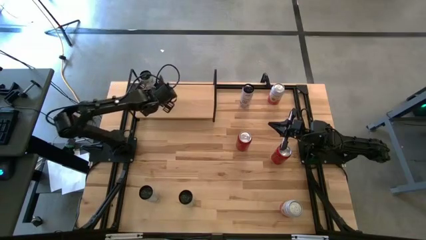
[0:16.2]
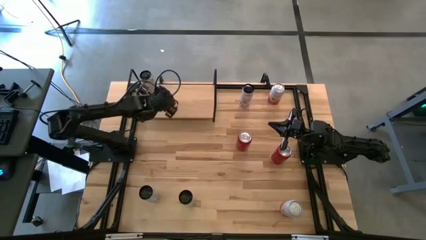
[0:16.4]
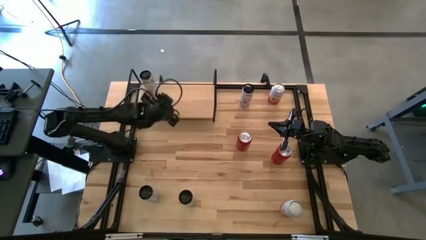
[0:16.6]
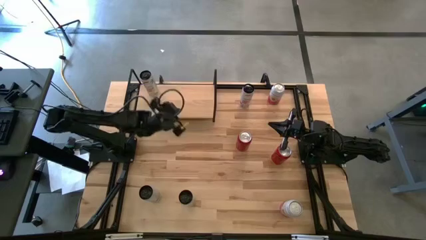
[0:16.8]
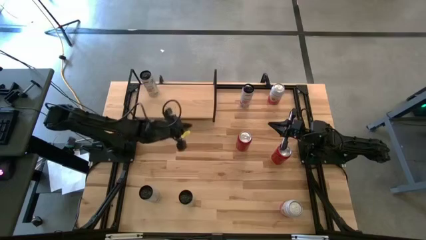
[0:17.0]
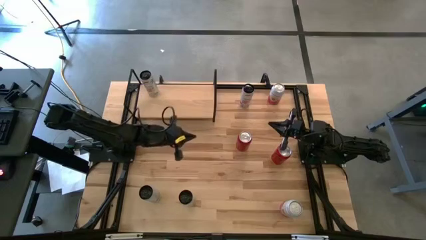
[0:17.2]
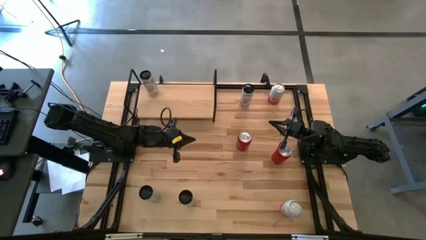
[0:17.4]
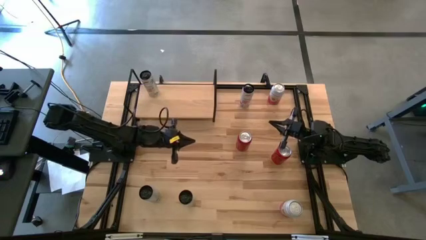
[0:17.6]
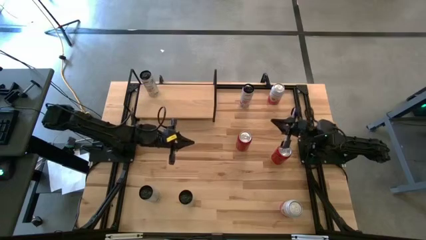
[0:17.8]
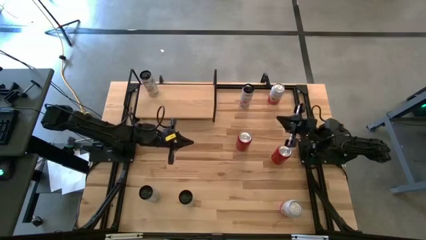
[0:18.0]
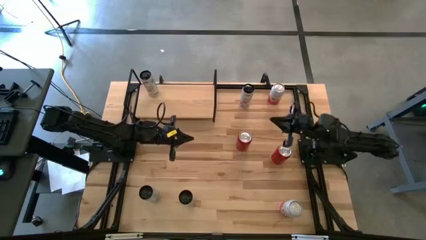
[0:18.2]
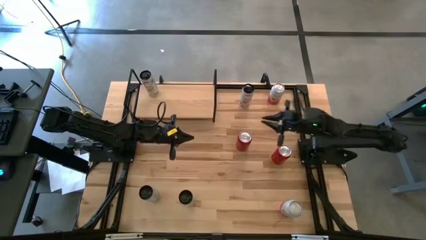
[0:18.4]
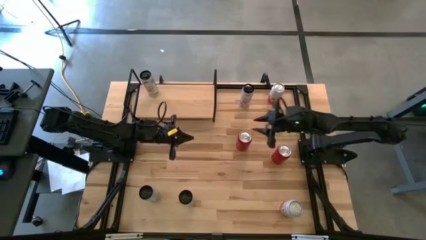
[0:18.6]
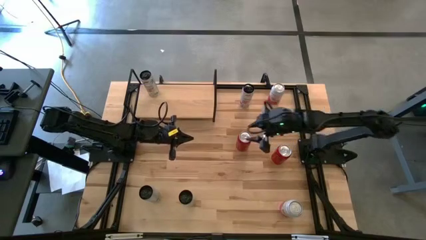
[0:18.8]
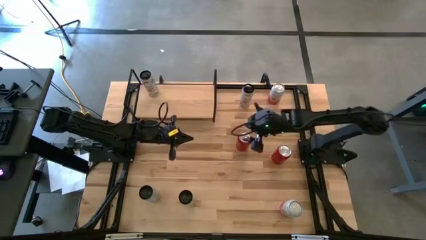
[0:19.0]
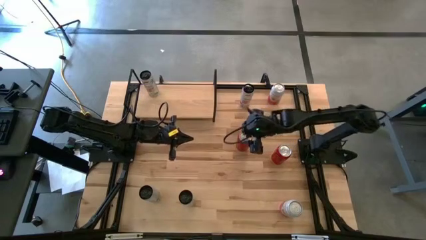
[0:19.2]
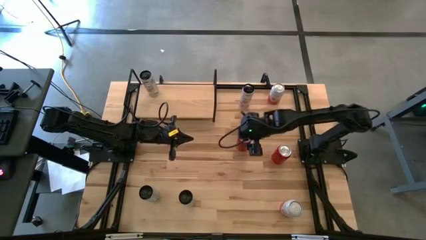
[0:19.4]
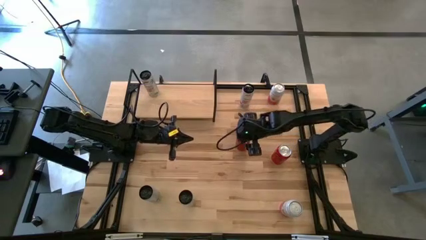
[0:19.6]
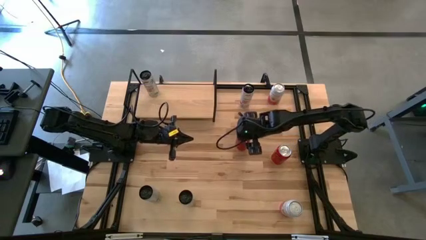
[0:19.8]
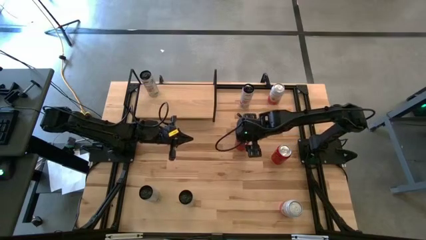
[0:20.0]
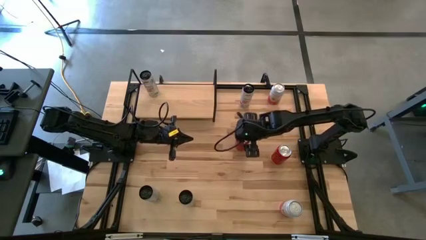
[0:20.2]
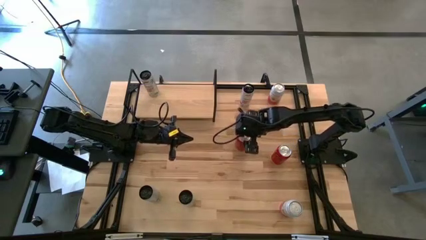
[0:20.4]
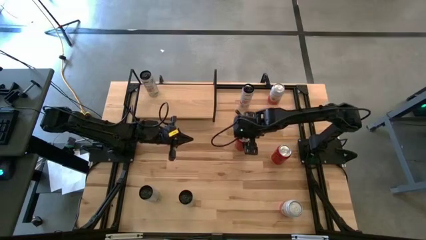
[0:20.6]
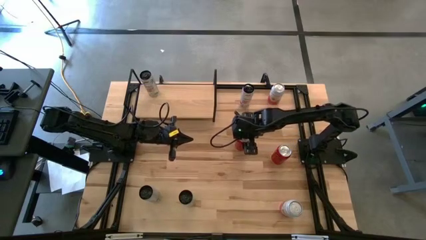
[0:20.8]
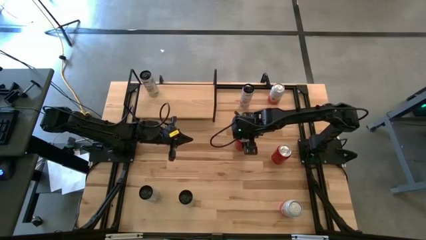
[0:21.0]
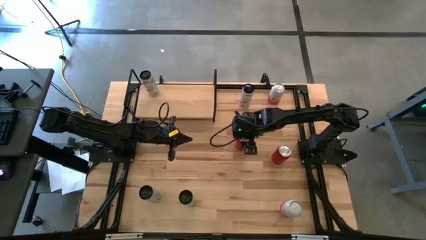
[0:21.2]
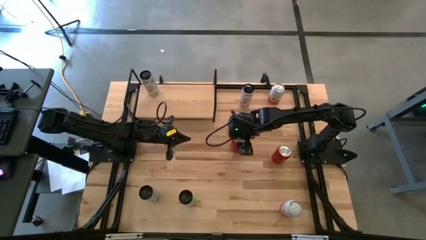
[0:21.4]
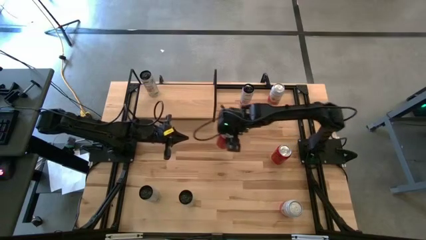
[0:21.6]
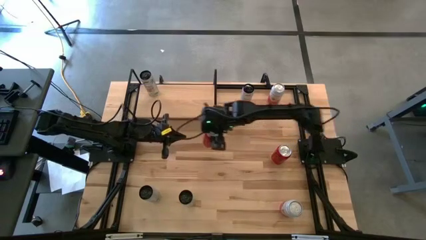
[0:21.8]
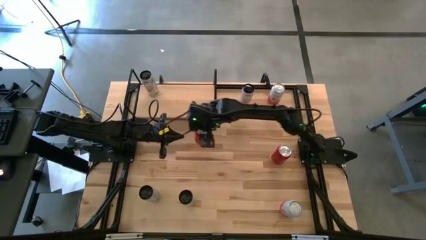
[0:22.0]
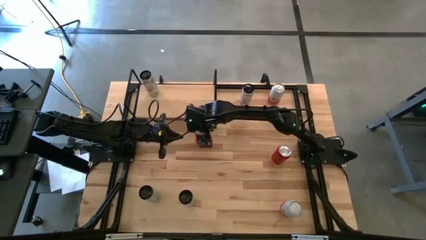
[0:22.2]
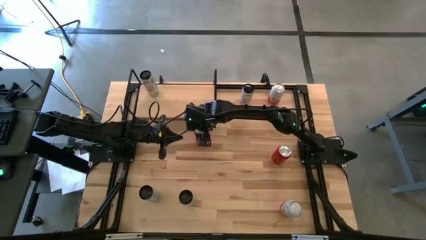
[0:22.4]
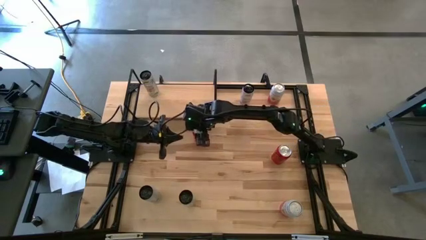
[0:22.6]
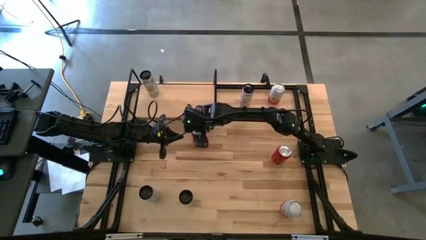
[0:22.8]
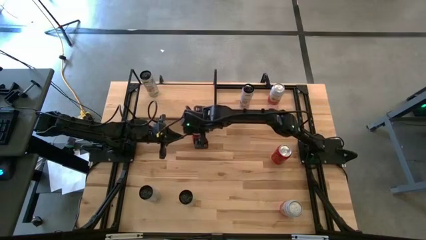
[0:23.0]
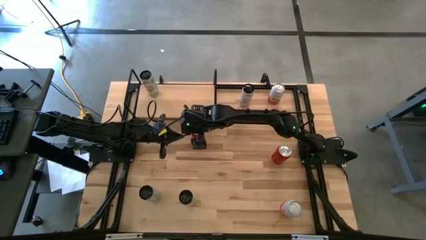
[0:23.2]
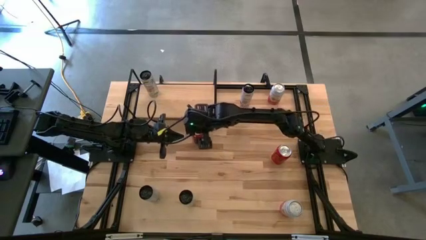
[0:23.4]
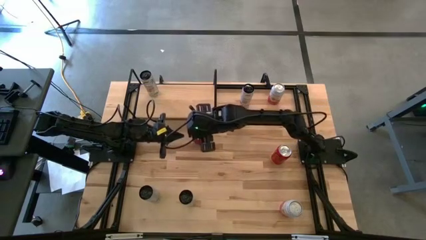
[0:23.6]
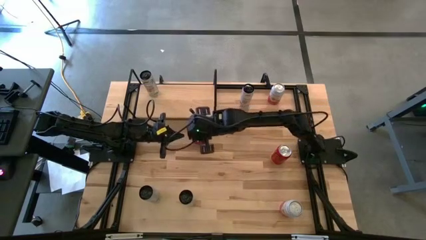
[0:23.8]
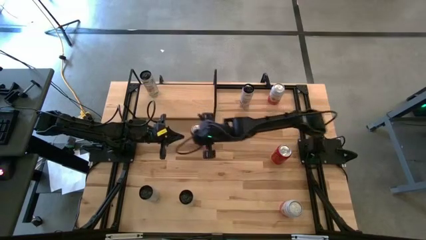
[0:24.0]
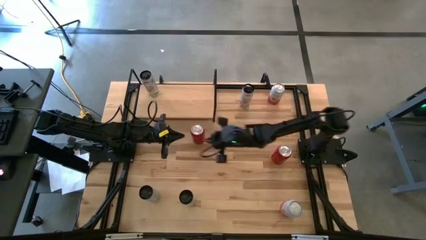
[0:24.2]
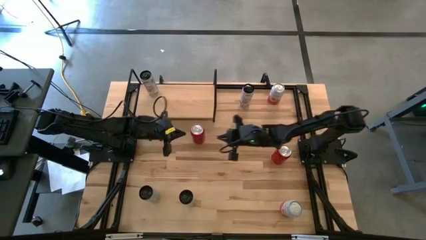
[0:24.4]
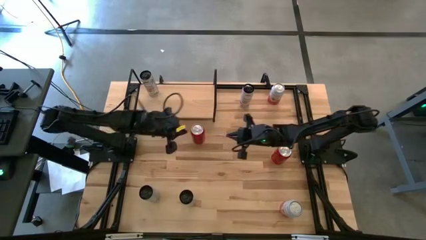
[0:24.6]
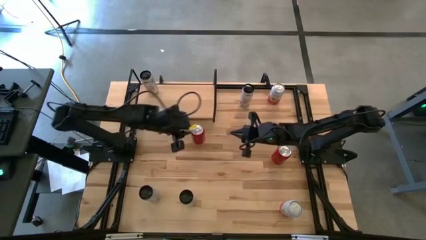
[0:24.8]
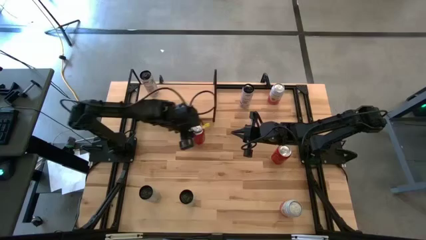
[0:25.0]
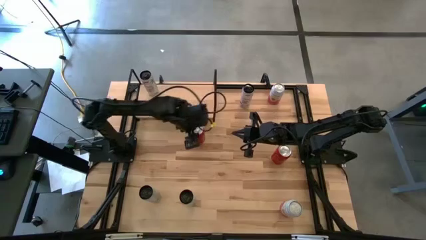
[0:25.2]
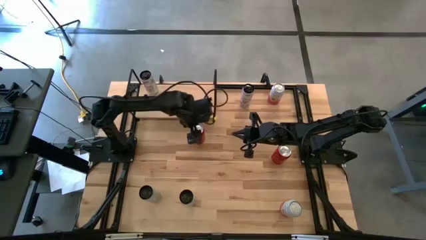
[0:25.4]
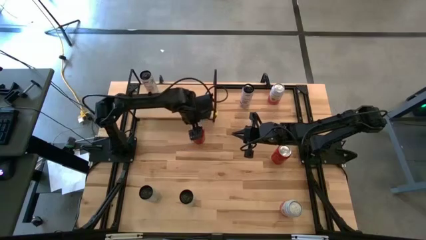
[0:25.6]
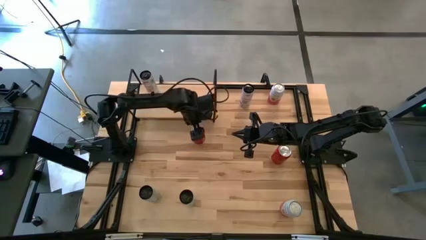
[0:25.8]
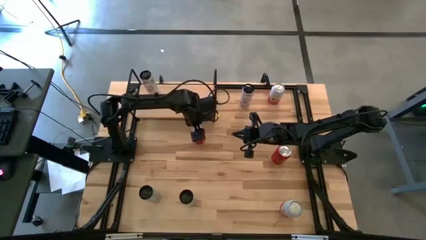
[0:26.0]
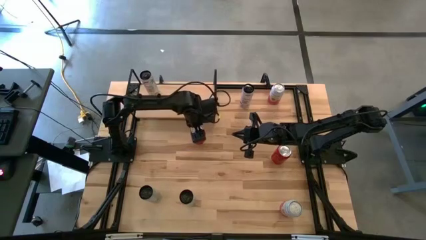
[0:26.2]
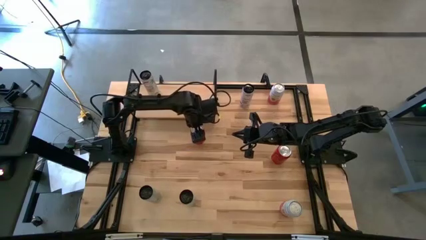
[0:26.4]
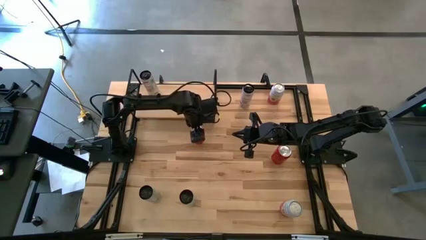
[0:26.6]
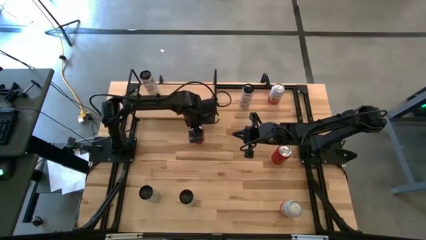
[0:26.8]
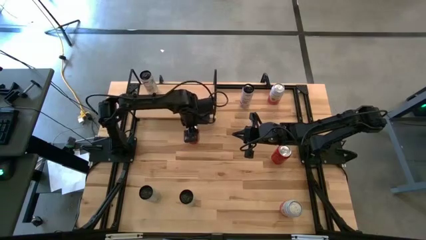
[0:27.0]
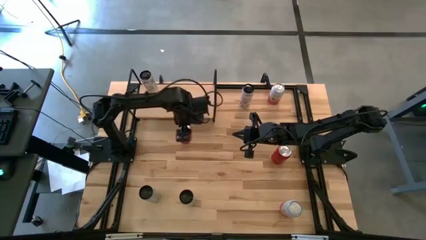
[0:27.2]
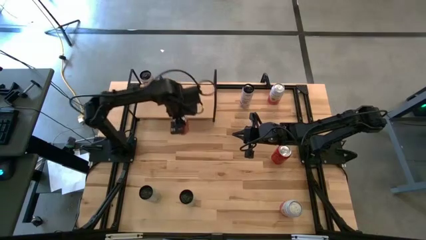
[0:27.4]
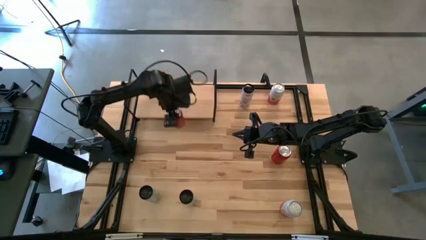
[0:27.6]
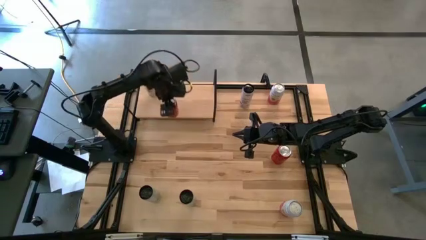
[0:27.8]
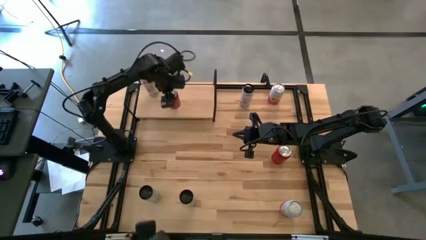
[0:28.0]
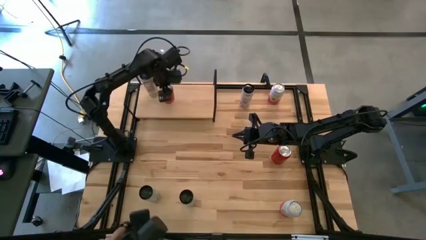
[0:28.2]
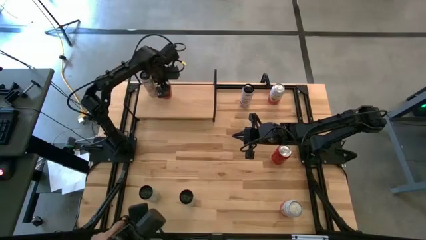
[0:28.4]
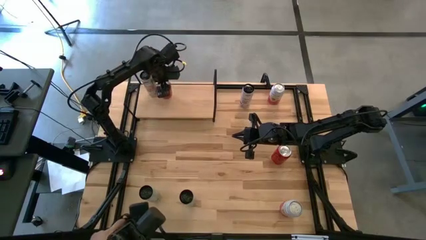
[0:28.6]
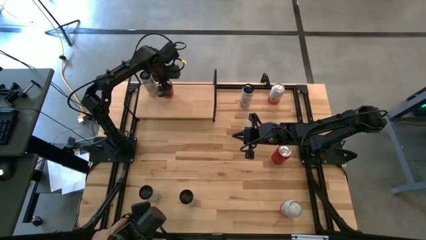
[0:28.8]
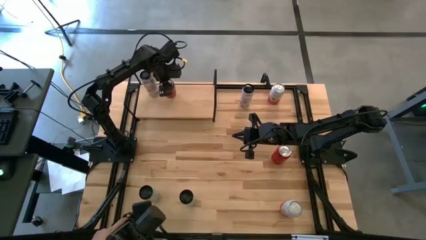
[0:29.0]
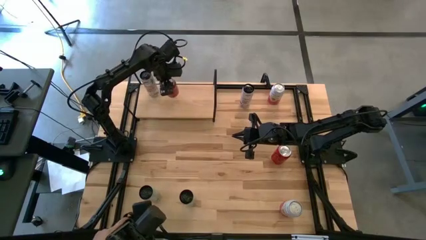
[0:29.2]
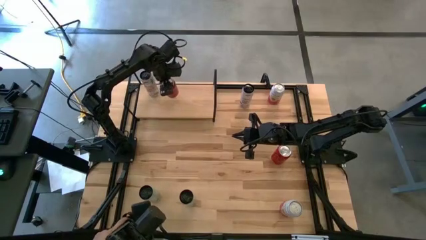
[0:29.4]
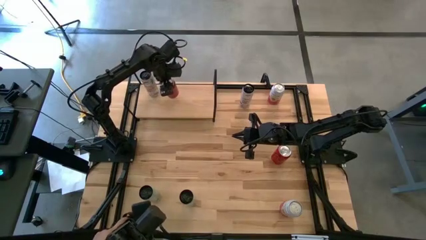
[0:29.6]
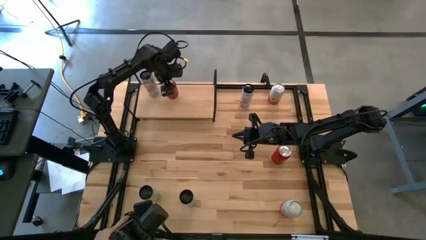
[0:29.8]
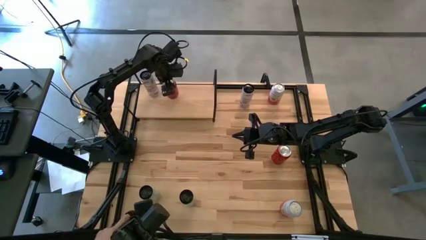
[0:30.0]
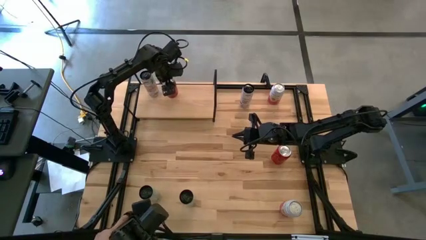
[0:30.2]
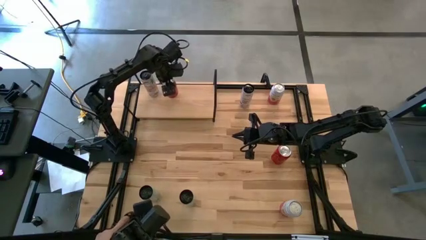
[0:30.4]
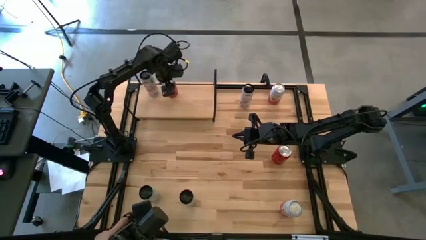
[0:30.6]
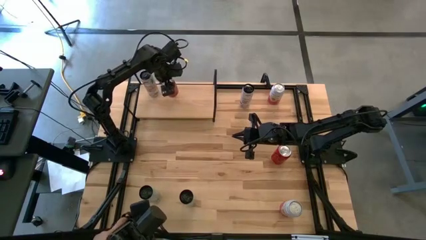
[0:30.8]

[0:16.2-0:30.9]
Task: Place canned beverage on shelf
Put the left red-black soda can on the shelf
